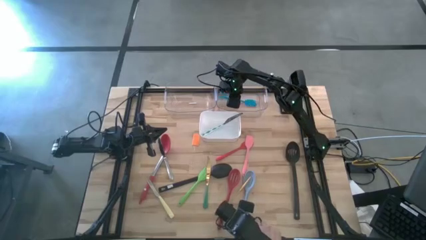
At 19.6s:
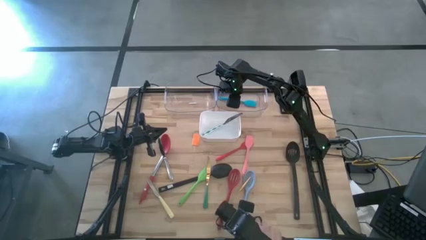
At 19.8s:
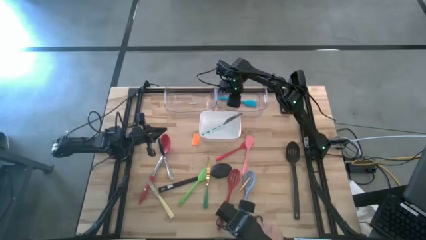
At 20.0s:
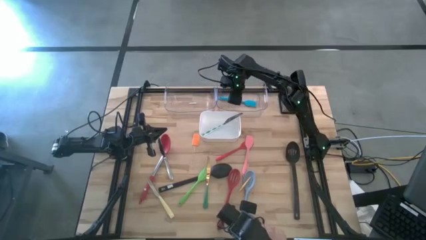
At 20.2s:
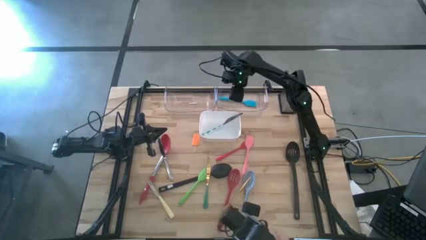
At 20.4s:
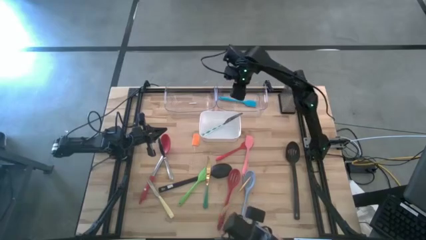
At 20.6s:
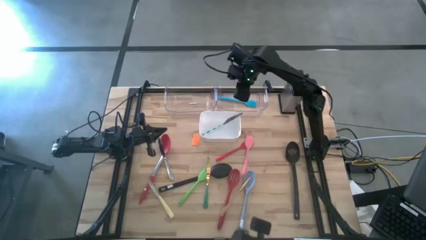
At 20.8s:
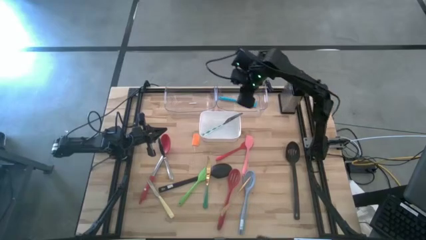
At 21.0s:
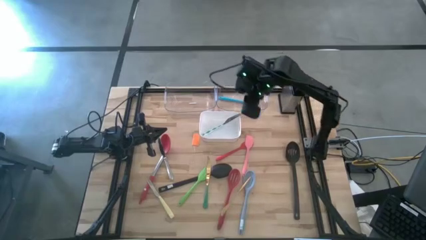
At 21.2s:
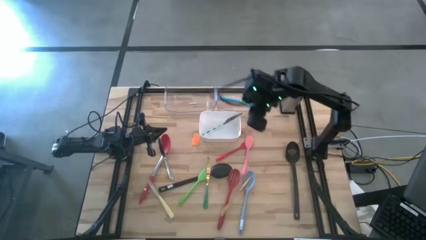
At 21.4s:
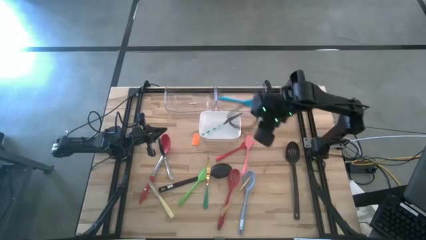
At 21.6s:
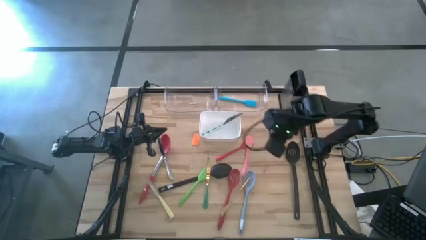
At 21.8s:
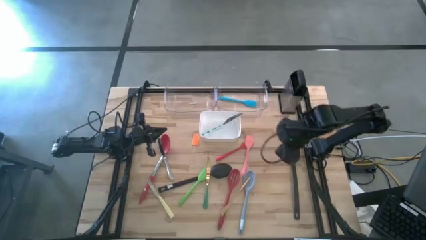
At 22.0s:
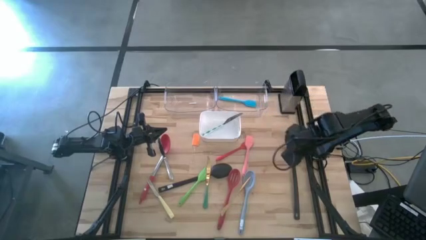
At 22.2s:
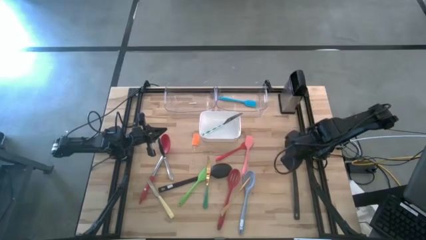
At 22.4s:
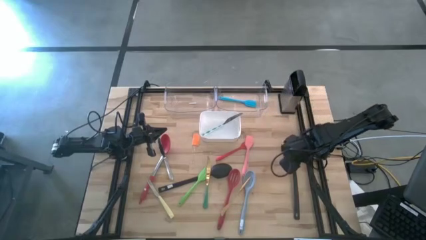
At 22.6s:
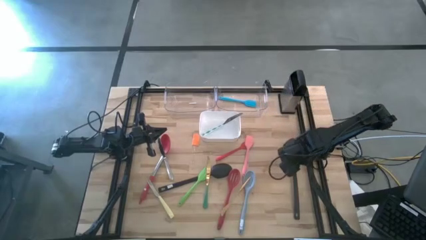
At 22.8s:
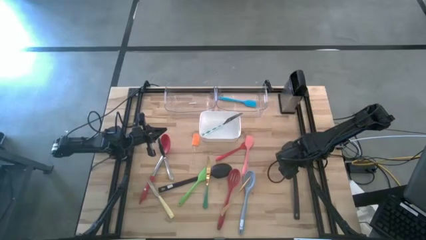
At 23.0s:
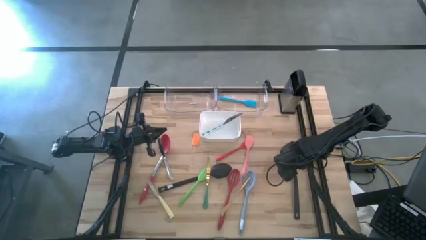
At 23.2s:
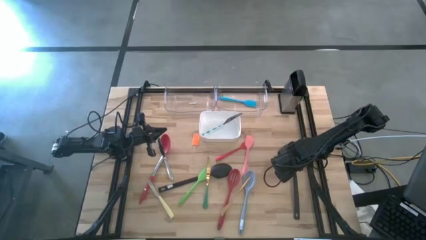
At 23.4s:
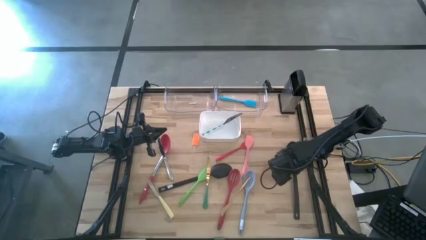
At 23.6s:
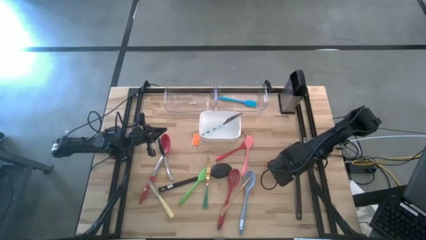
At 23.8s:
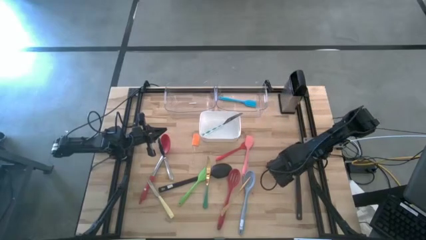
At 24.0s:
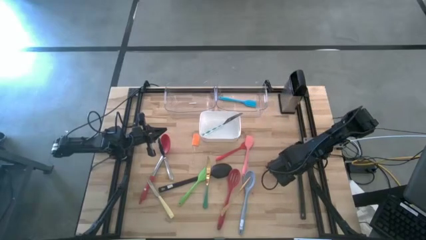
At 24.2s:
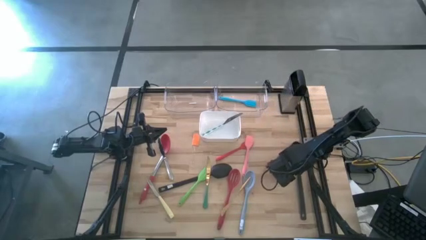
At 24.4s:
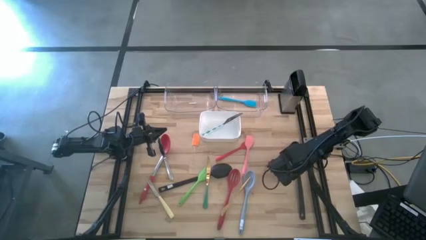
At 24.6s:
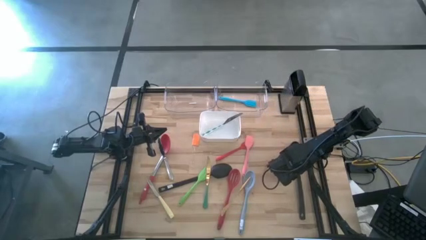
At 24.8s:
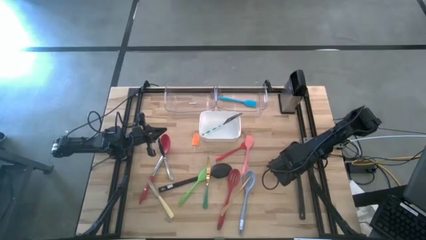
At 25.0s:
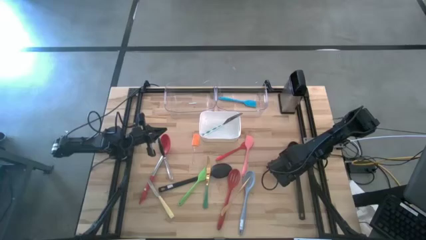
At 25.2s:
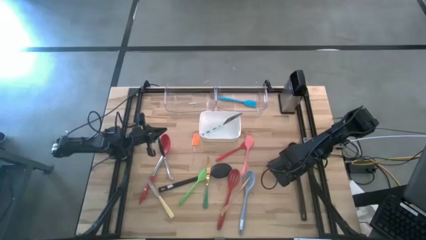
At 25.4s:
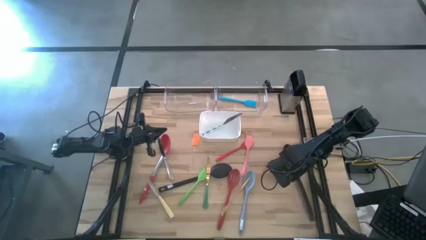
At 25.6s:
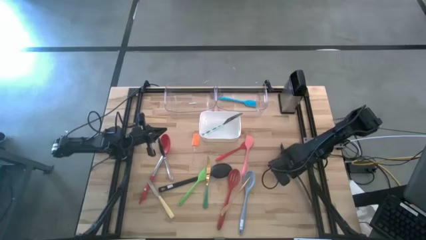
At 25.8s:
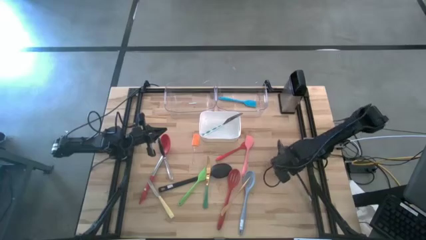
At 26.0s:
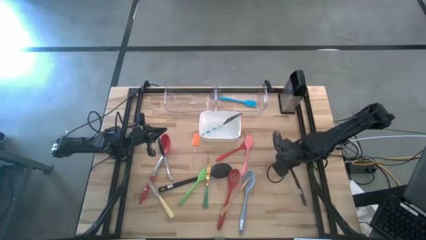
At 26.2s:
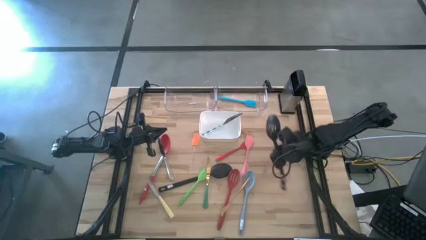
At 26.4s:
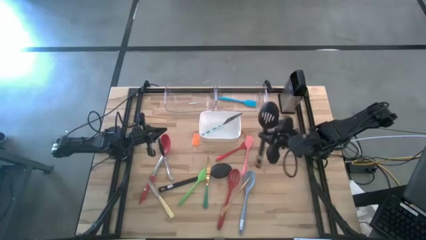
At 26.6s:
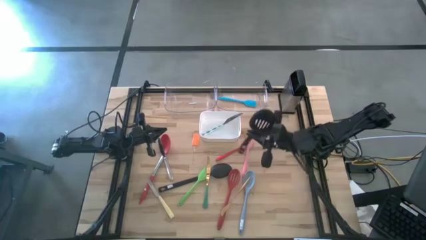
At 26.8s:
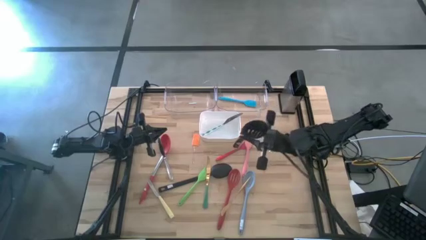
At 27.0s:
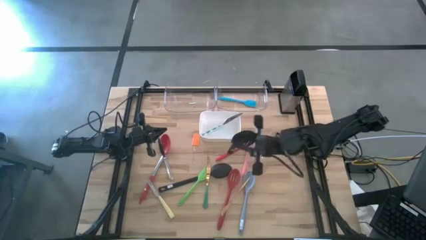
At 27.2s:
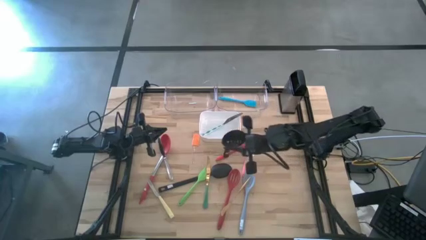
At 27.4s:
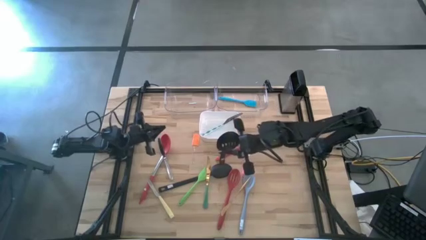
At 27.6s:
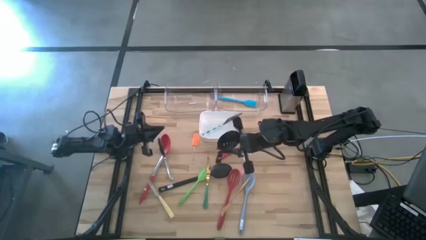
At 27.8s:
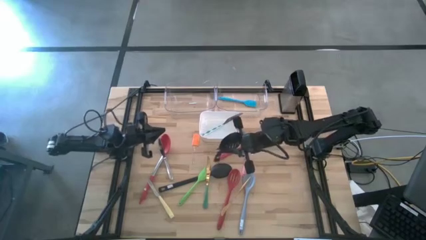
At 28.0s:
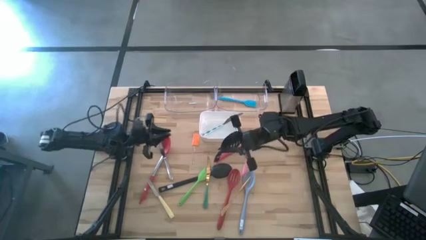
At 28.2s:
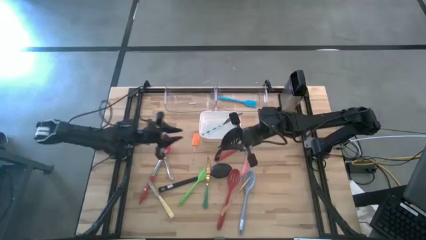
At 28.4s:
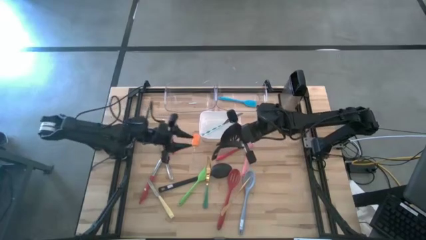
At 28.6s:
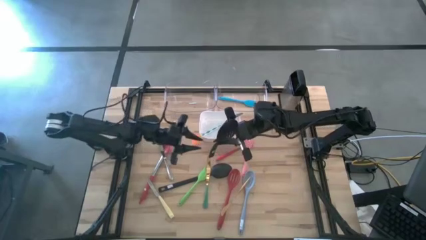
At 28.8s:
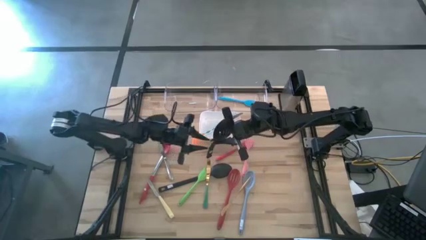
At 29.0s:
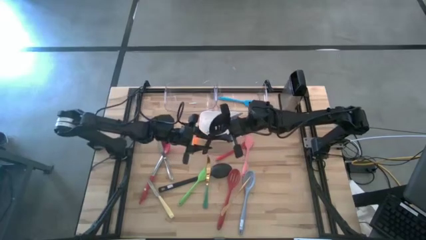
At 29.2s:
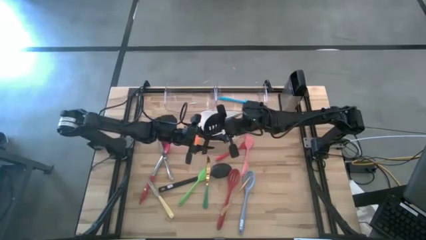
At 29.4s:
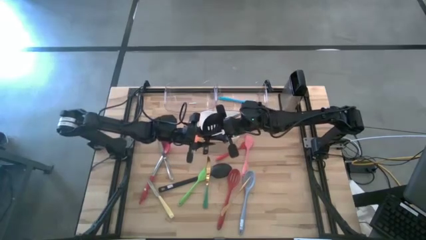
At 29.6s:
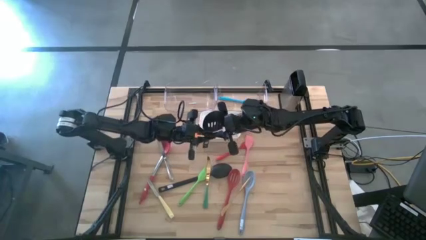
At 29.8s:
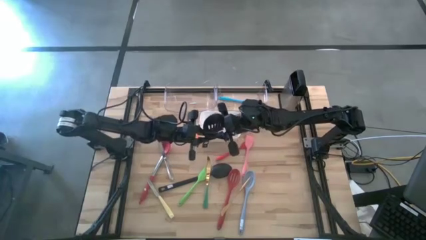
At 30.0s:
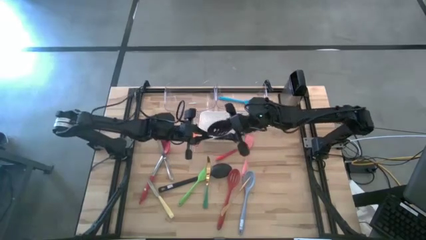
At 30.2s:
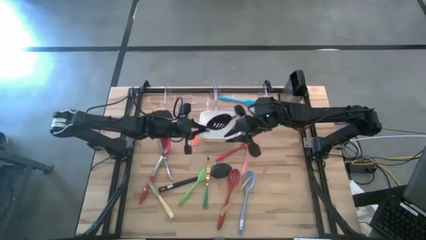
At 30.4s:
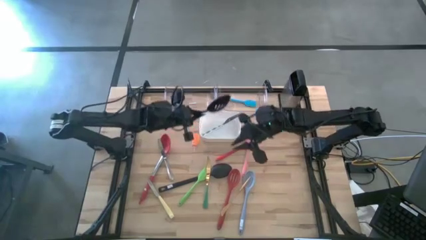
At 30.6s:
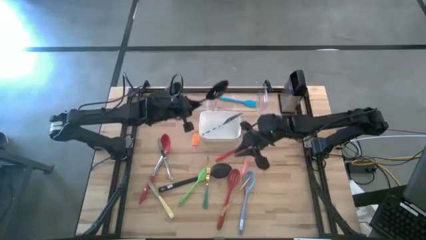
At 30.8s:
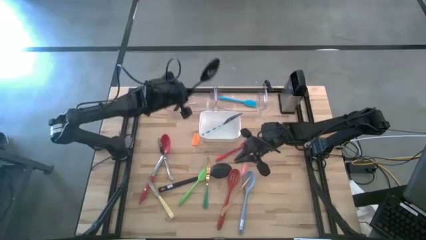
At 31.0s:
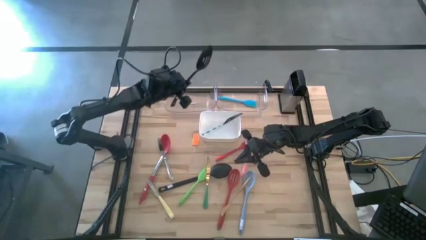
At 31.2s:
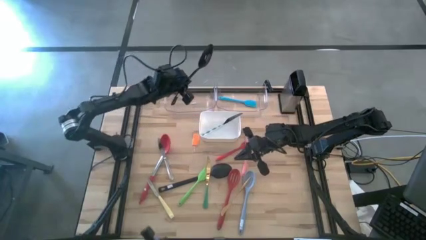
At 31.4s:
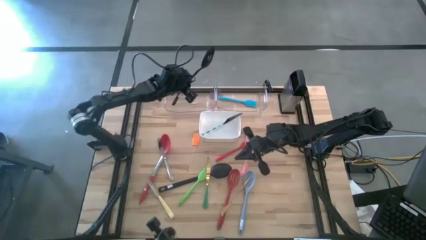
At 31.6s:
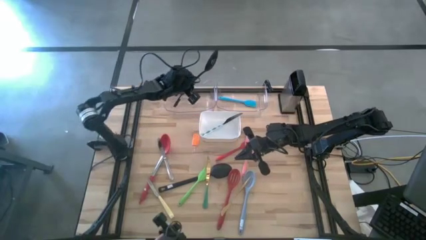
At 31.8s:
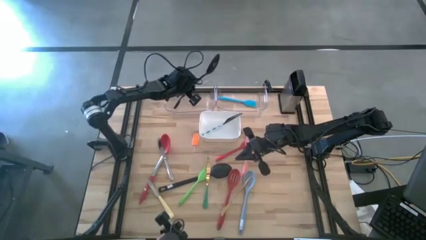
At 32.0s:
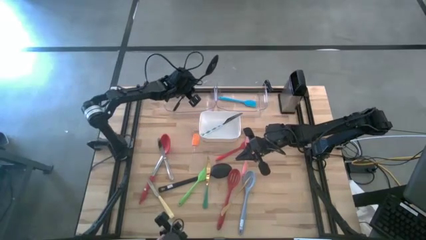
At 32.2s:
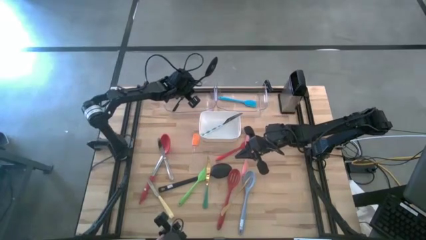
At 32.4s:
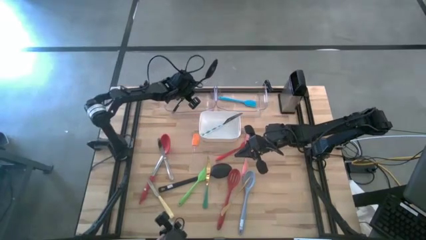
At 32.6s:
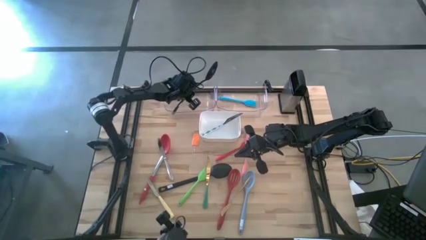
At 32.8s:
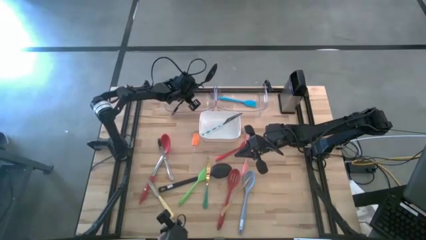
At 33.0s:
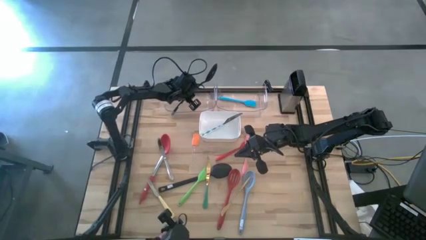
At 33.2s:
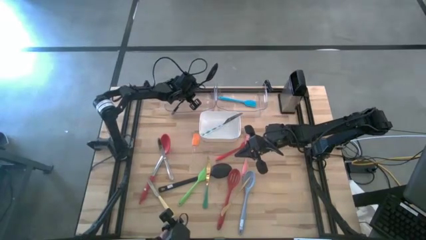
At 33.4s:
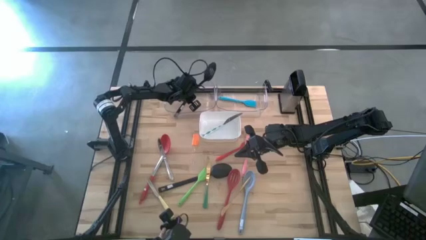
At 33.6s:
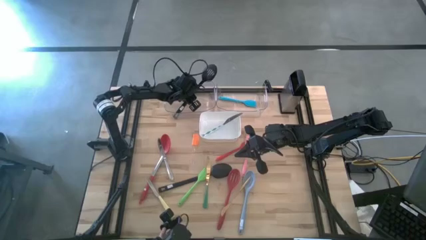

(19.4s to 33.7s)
Task: Pick & Place Kitchen Items
Put the black serving spoon into the left transparent bin

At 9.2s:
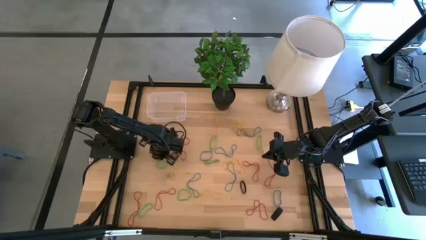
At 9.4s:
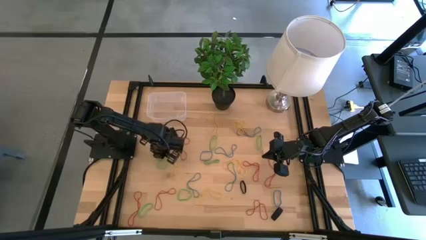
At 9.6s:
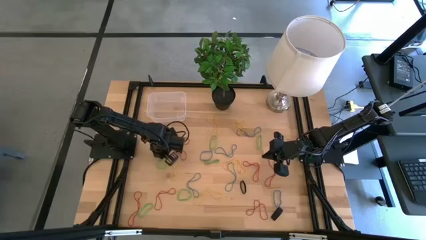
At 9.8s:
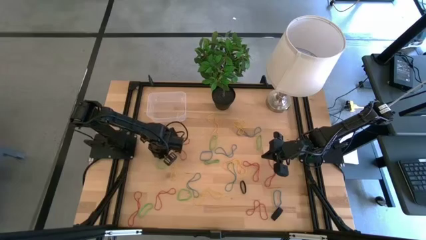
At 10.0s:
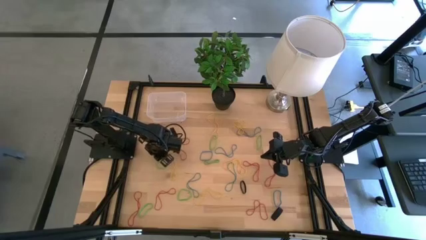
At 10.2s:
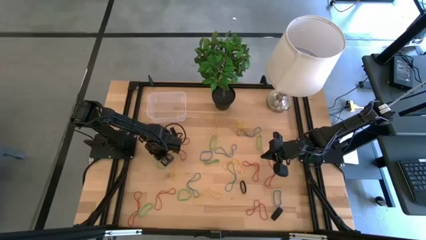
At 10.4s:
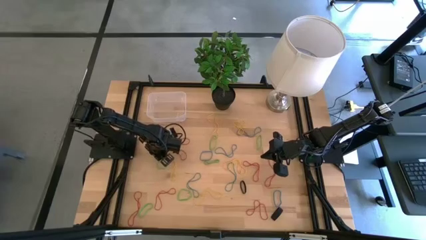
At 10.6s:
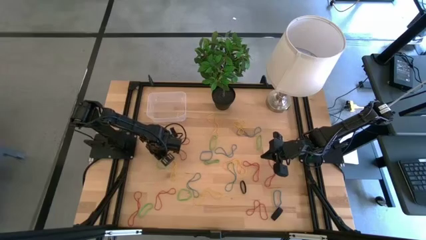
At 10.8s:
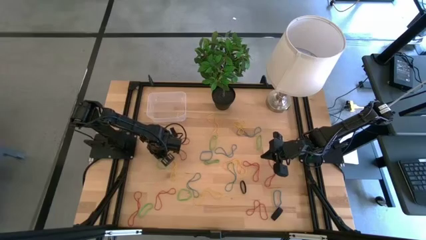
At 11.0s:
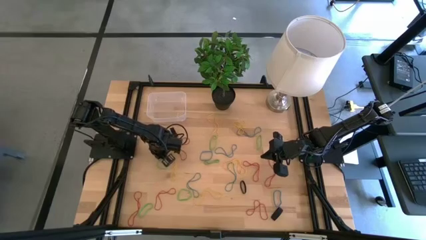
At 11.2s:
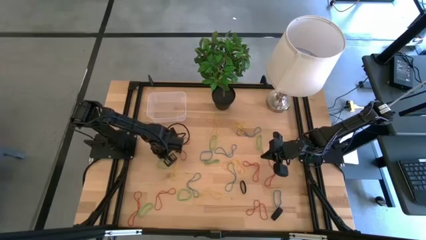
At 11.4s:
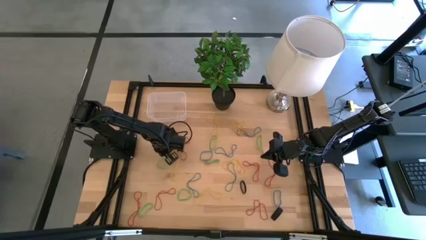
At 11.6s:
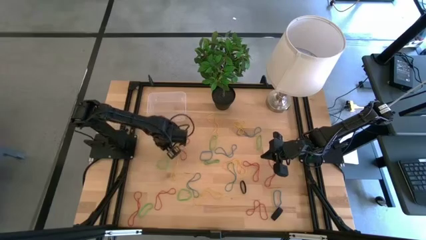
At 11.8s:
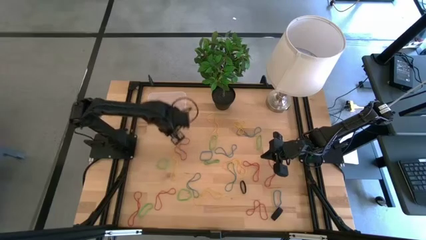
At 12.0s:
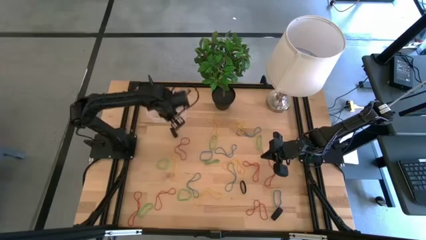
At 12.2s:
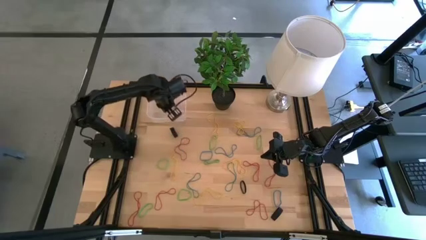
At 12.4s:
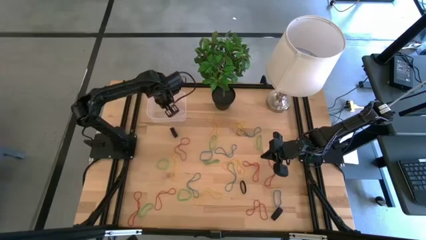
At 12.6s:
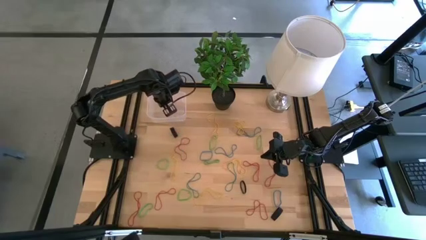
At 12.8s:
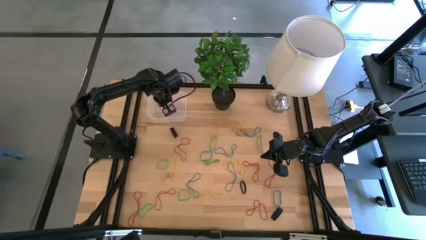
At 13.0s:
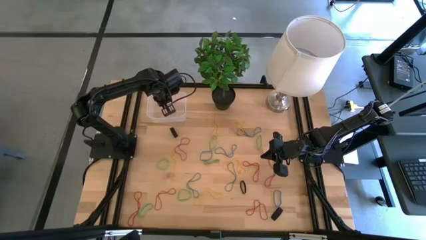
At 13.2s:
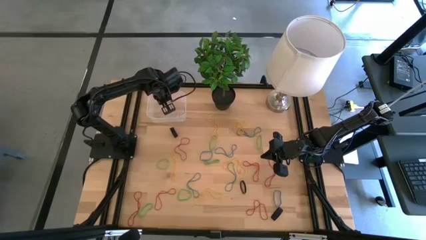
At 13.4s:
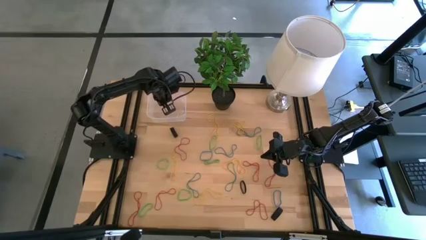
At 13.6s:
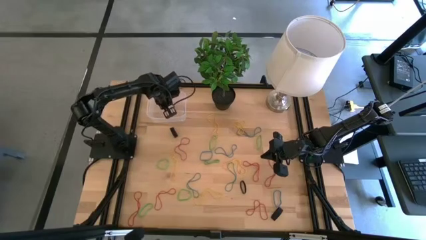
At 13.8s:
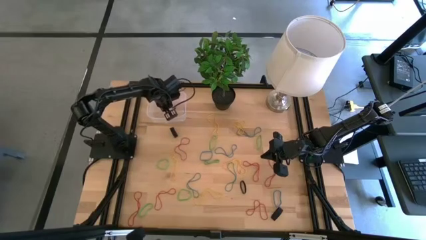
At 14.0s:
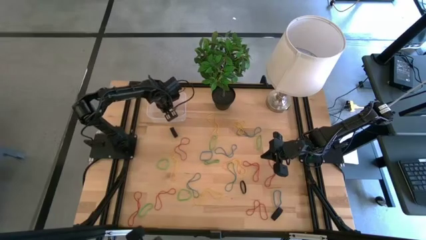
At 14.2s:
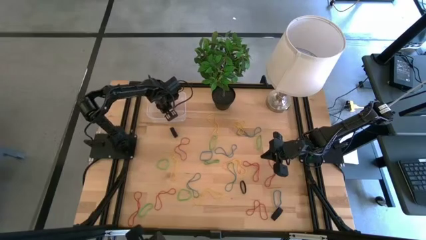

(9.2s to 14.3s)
Task: Pick and place rubber bands into bin
Put the black rubber band into the transparent bin
